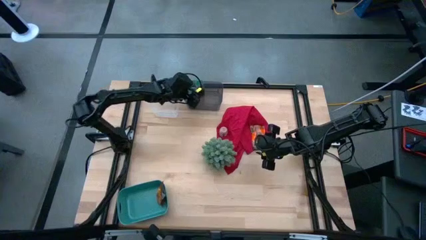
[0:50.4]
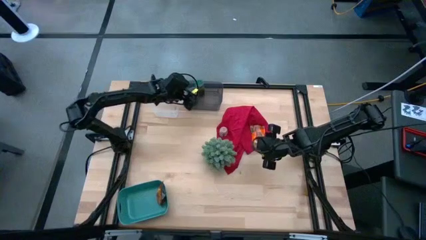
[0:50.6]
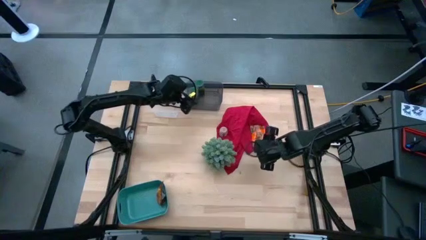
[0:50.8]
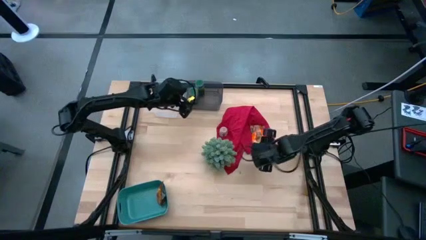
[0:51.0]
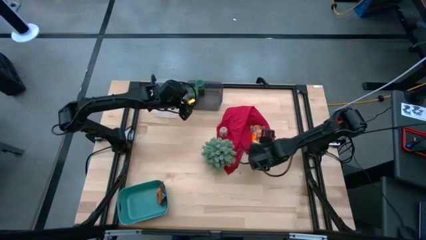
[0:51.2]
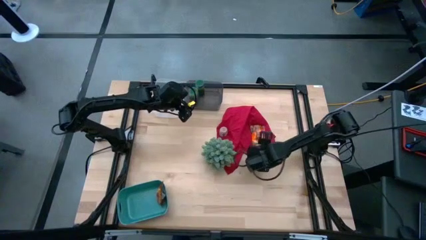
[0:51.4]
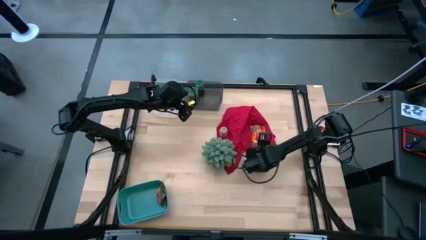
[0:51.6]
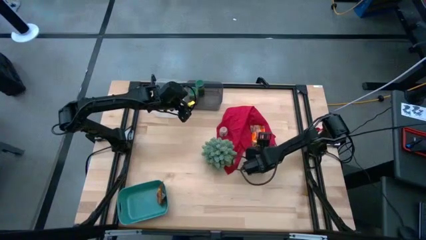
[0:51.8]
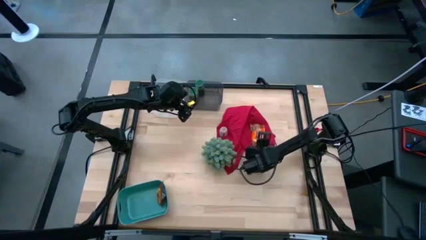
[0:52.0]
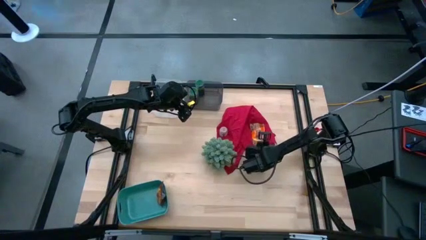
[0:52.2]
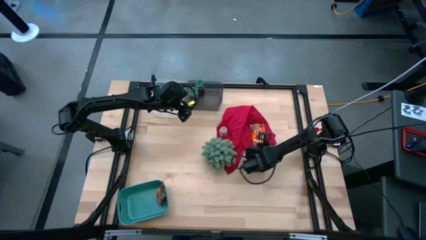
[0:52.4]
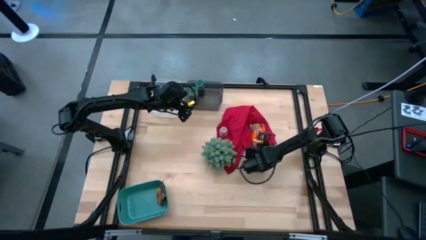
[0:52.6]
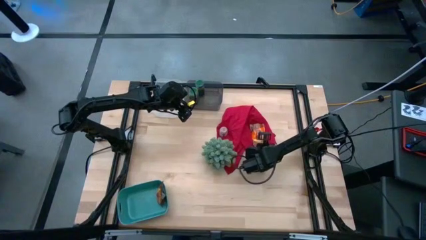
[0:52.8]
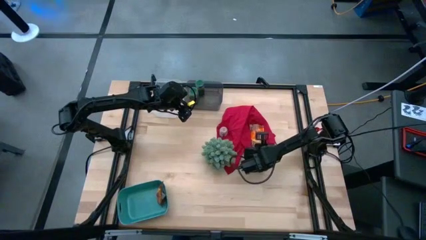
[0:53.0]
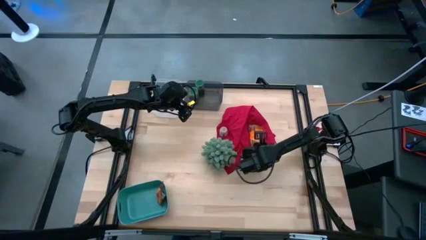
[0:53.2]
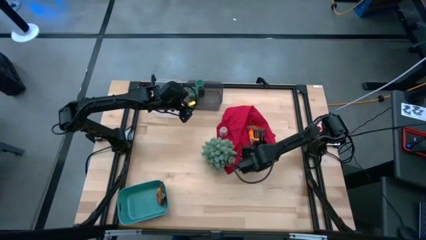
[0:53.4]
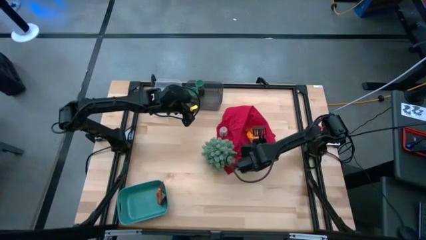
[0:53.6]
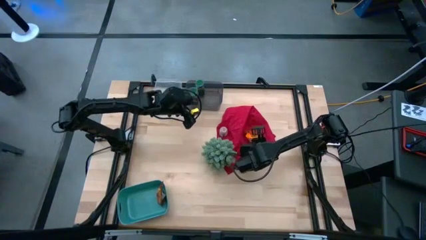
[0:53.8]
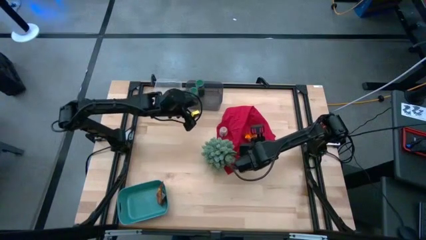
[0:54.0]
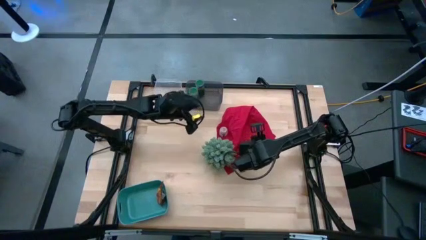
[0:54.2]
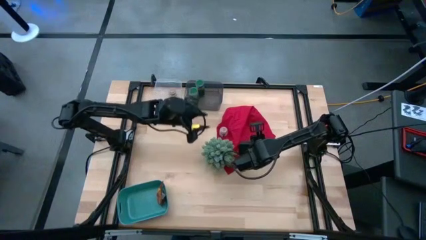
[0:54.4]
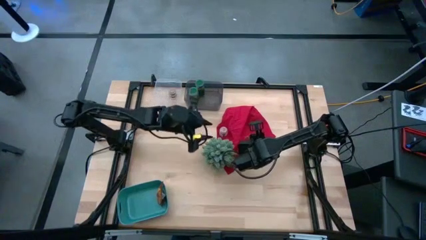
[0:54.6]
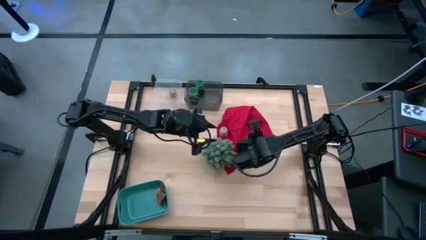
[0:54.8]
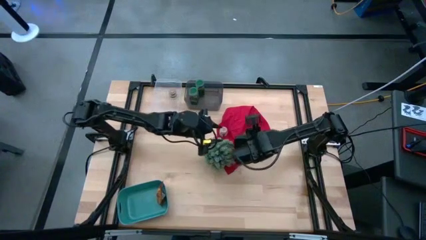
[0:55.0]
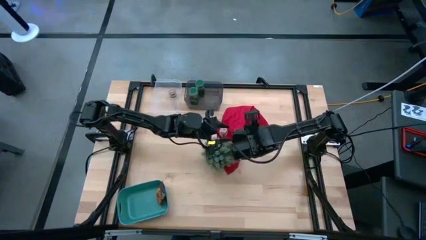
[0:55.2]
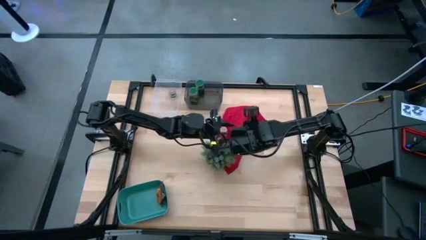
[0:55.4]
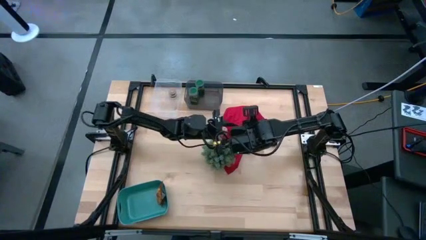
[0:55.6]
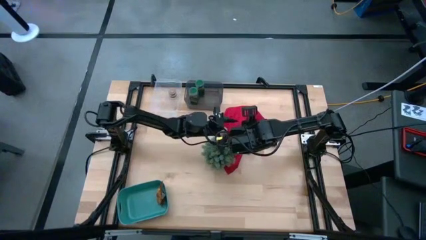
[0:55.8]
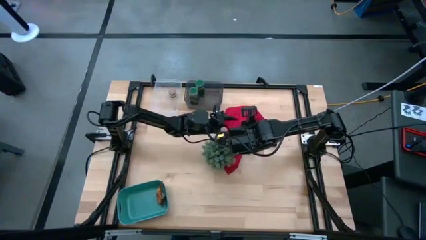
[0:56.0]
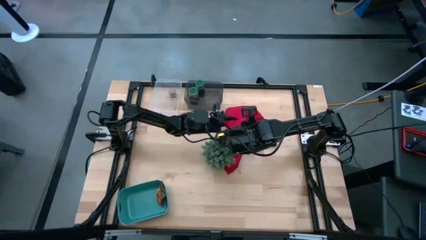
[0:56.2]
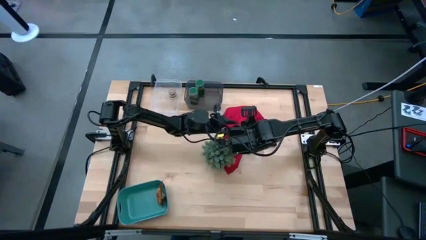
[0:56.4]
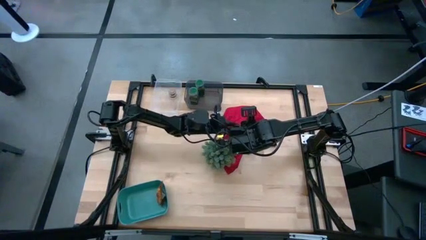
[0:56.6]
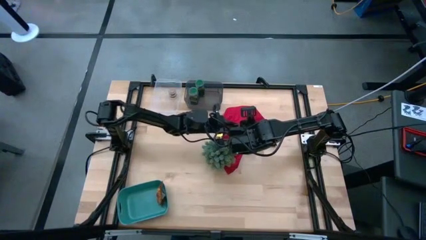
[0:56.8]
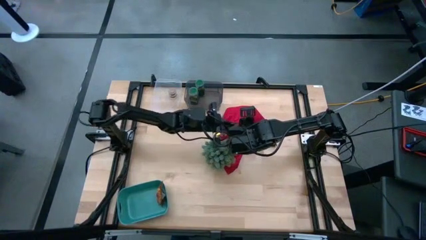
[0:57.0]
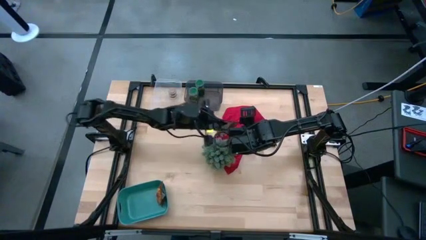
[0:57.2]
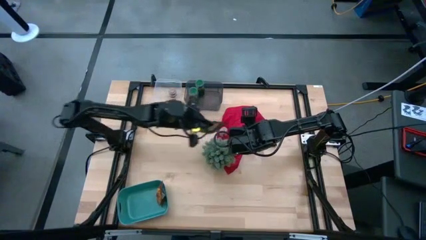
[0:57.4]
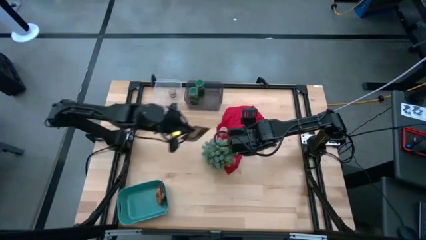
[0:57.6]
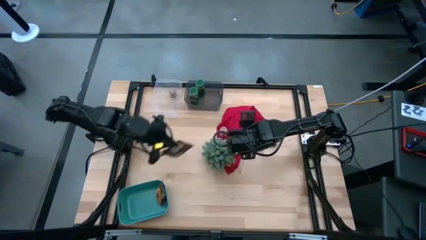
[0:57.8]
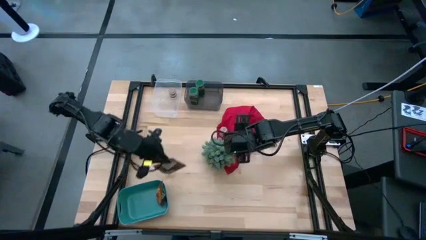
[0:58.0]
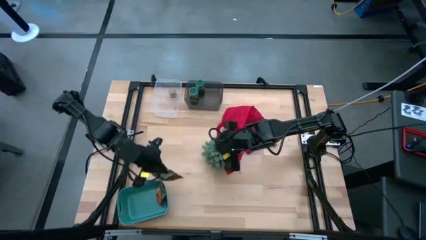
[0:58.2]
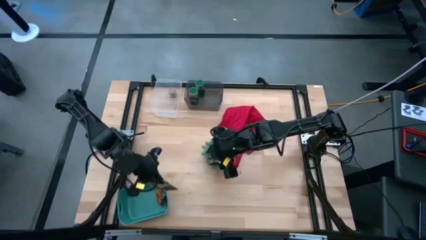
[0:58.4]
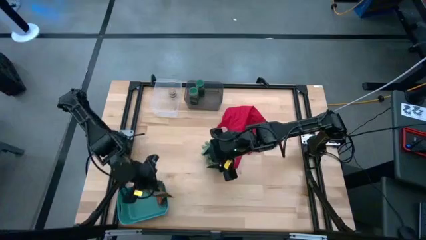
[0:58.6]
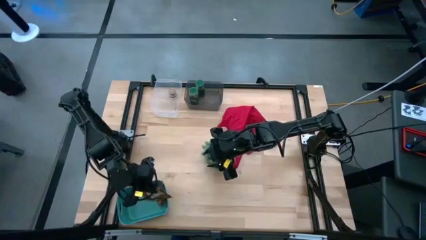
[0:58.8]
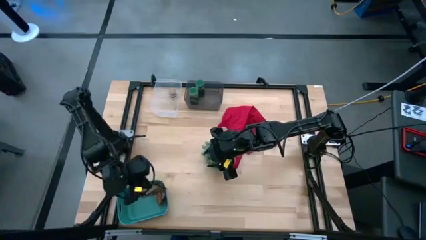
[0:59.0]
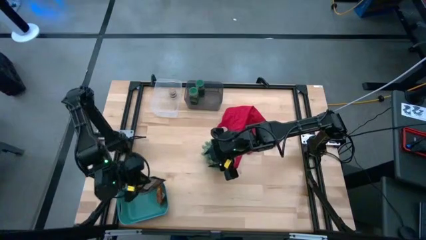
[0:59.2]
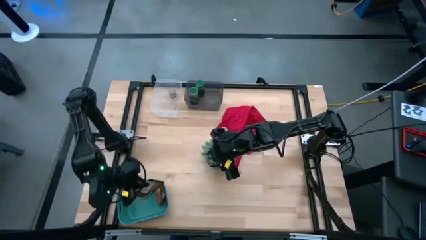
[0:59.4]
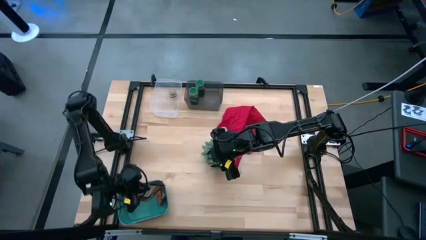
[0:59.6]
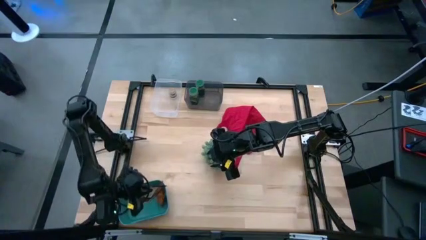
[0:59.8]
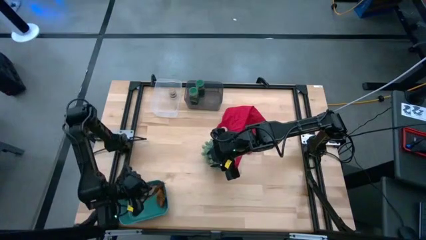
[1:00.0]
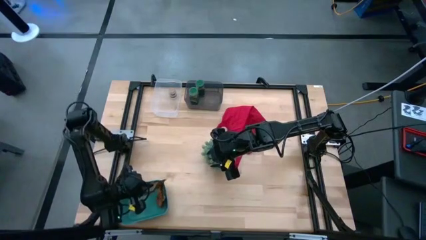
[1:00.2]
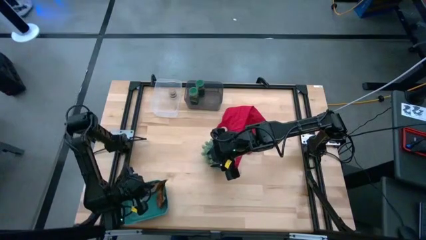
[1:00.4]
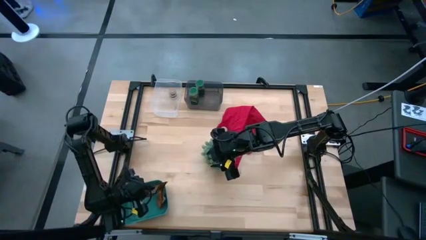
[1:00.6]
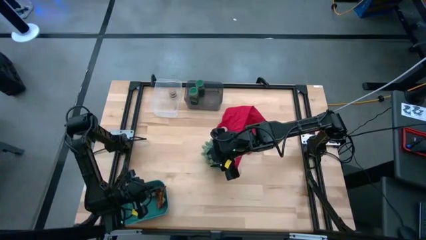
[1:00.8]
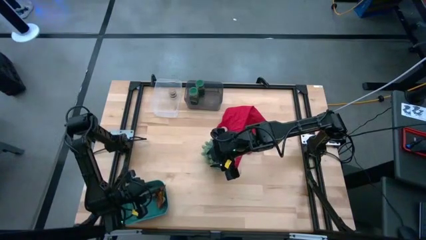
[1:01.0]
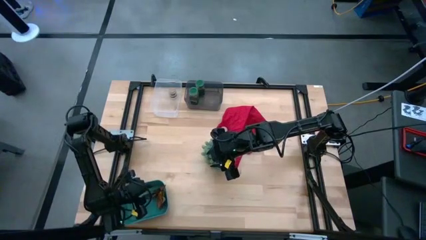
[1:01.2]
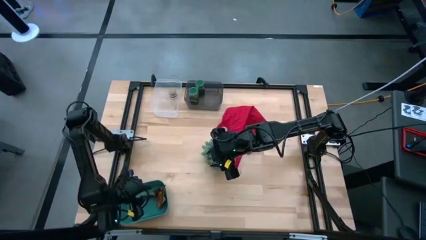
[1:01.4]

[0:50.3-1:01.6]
Task: Sort spices by type
Put the orange spice pack into the green bin

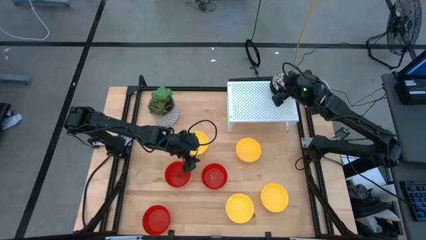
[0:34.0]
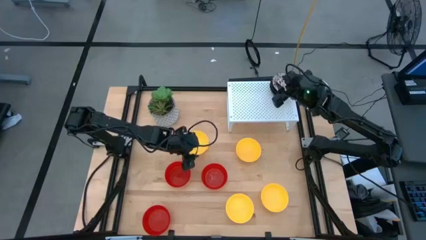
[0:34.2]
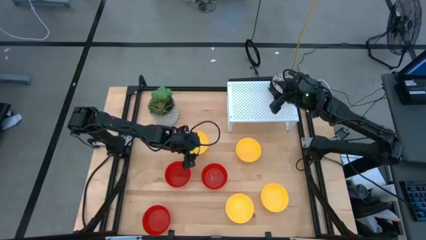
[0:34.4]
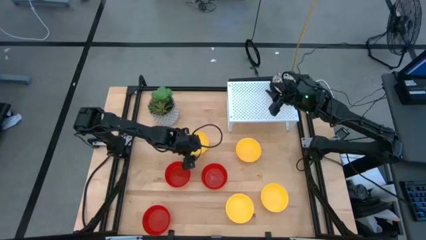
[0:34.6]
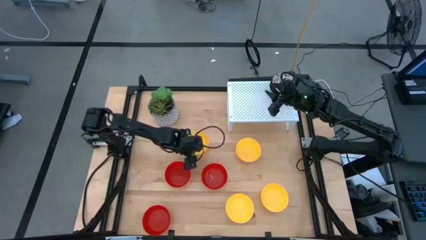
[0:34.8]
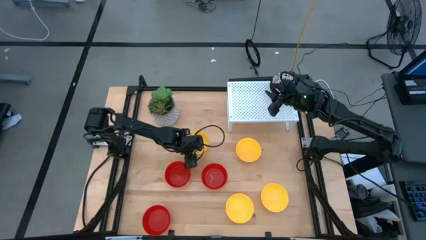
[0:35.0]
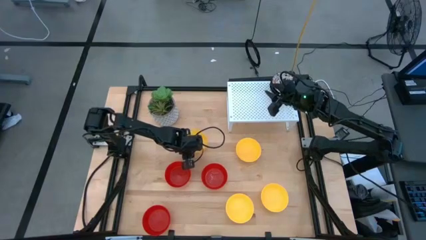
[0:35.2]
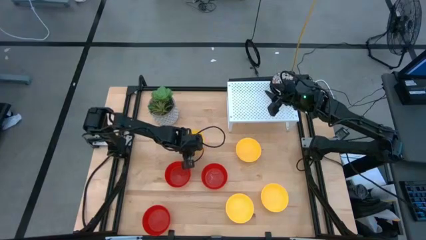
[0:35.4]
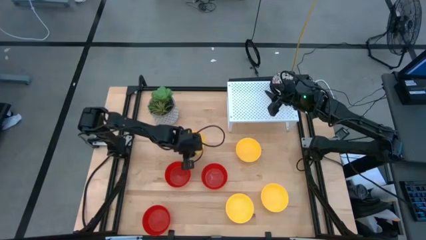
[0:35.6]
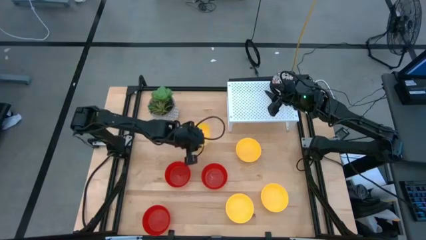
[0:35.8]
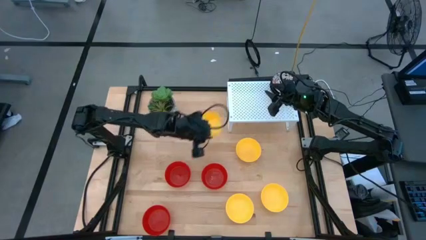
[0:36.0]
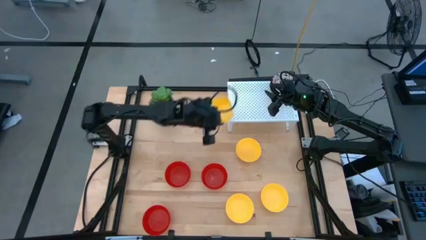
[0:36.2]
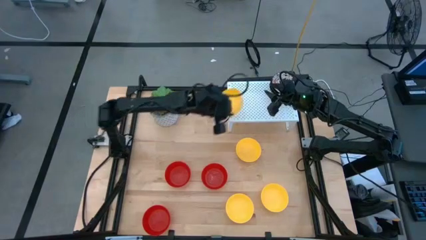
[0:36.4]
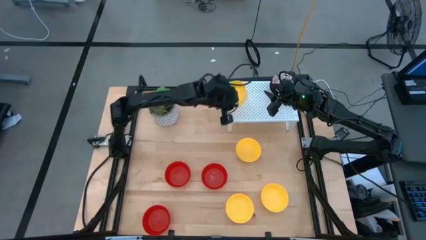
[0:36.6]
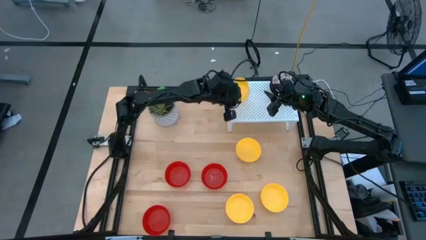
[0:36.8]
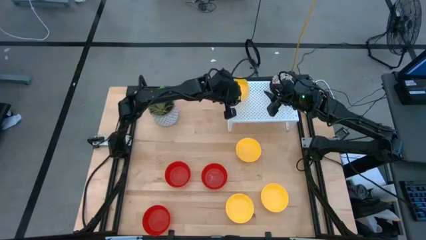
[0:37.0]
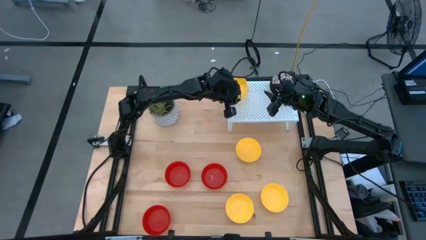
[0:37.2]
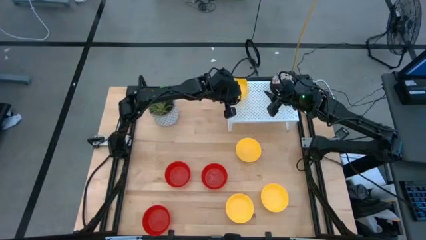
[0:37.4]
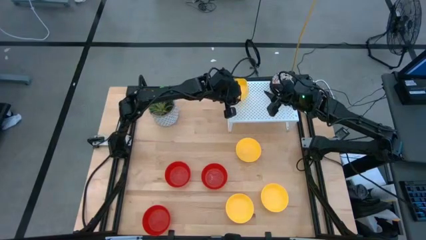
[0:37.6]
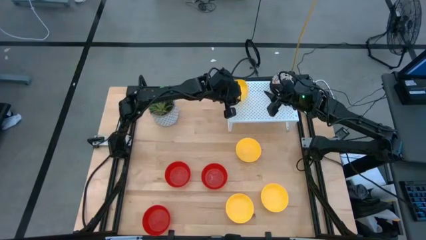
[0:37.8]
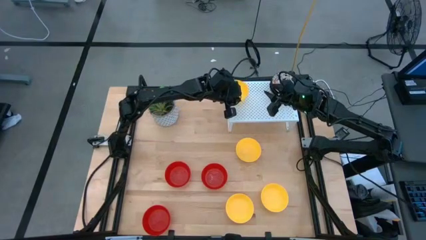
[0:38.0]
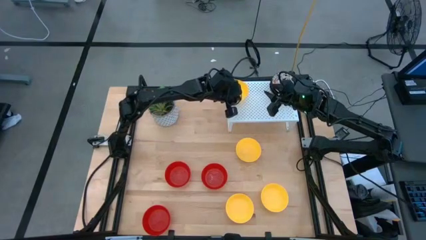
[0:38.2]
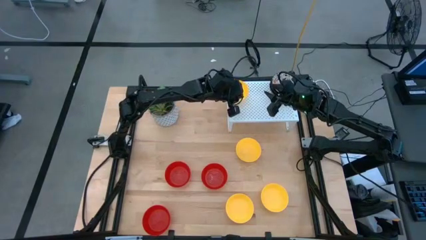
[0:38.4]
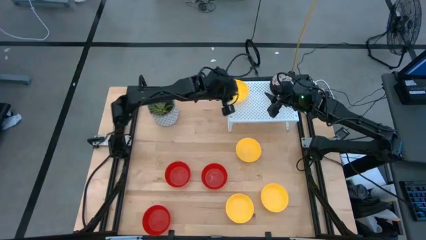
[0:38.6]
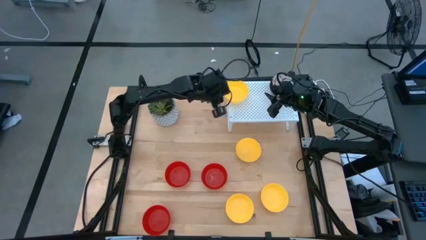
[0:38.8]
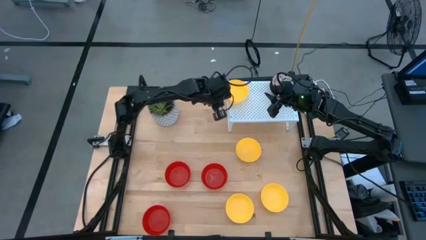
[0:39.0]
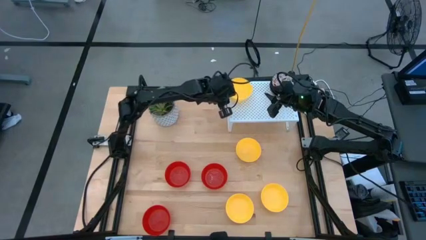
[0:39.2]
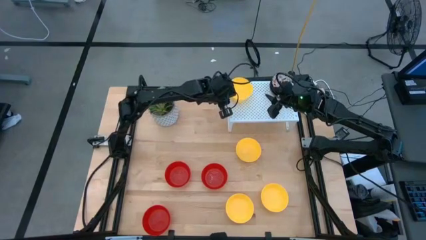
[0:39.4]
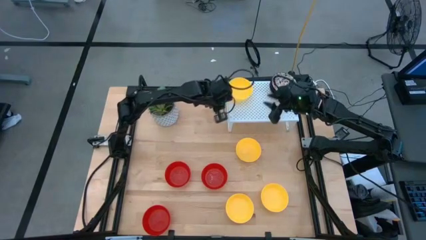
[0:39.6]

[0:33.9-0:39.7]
Task: Pick & Place Mini bowls
Put the yellow bowl on the shelf
